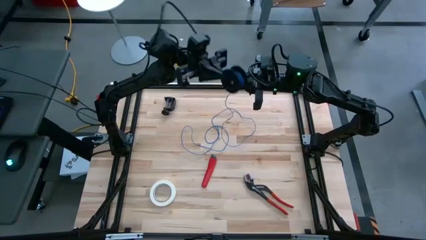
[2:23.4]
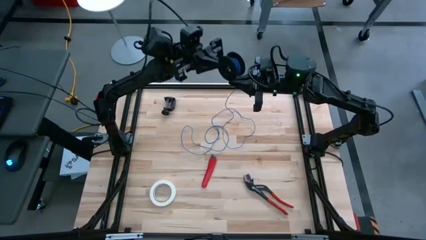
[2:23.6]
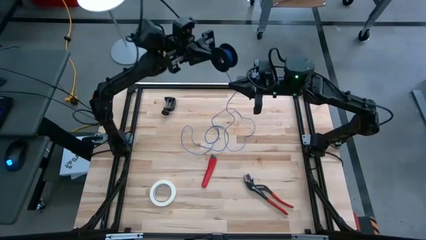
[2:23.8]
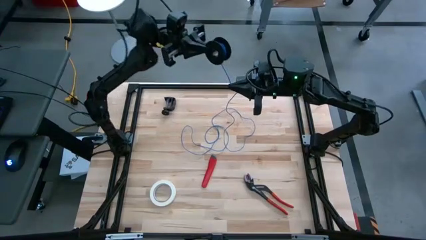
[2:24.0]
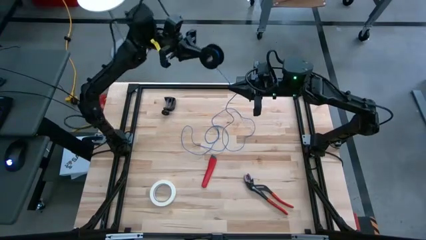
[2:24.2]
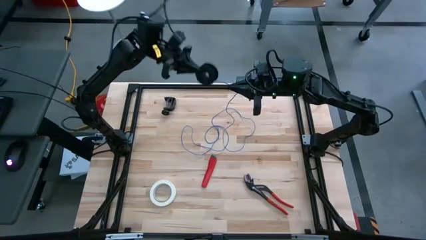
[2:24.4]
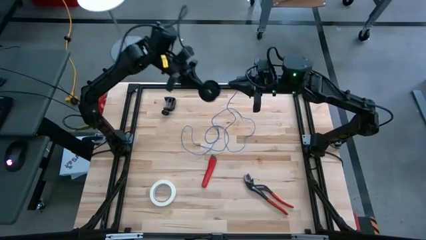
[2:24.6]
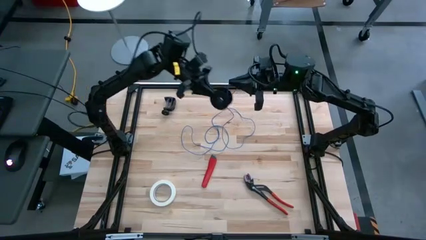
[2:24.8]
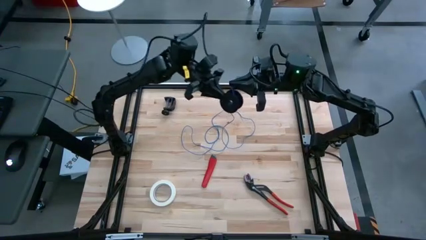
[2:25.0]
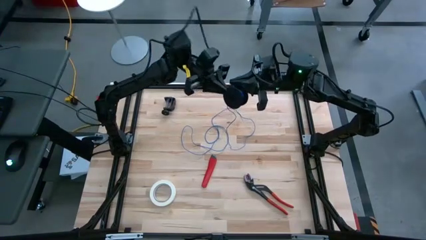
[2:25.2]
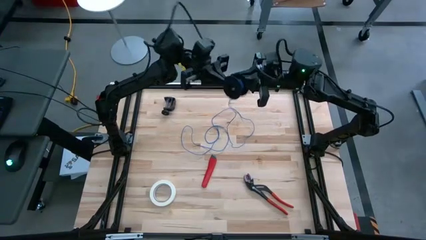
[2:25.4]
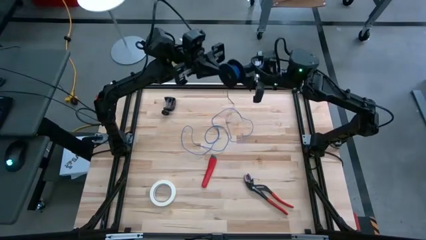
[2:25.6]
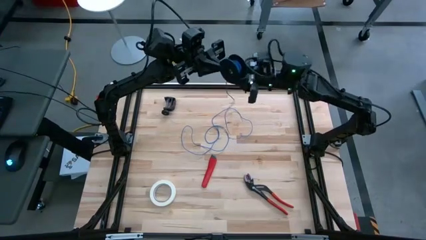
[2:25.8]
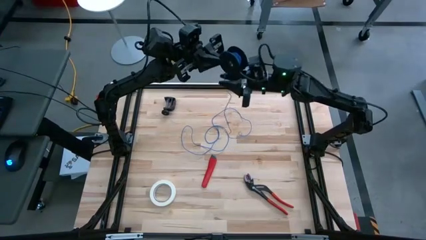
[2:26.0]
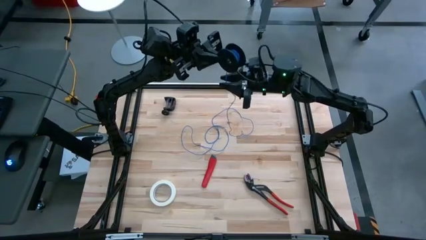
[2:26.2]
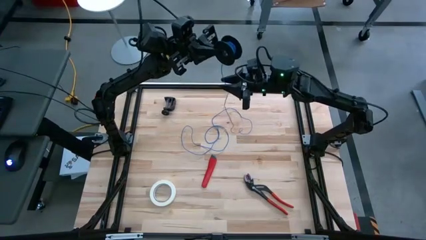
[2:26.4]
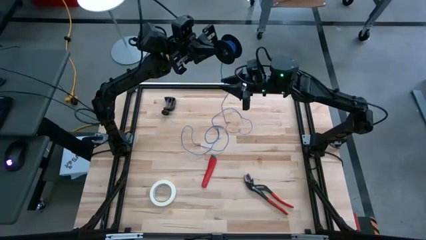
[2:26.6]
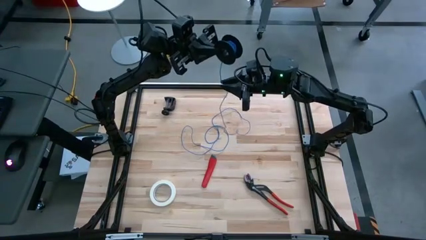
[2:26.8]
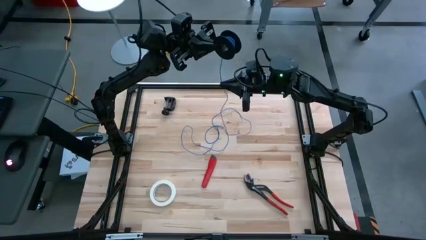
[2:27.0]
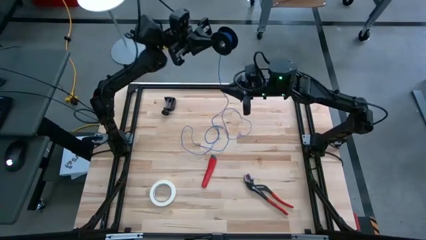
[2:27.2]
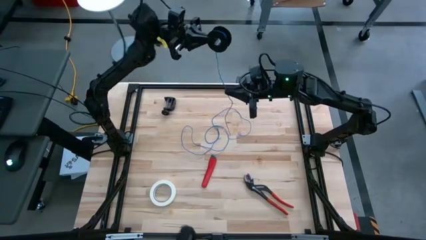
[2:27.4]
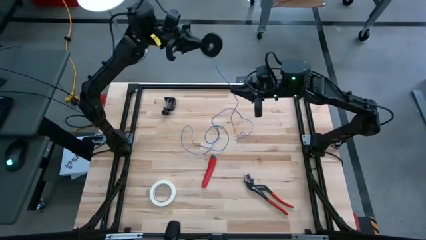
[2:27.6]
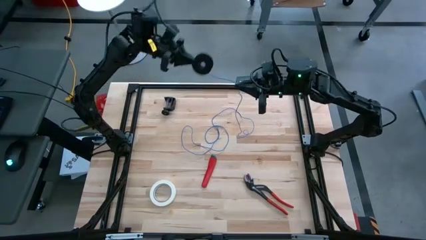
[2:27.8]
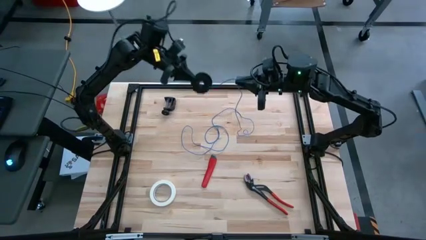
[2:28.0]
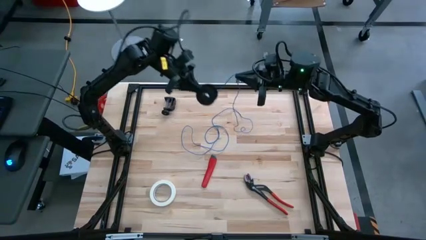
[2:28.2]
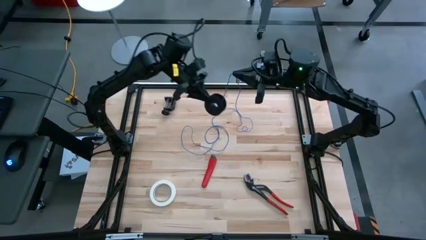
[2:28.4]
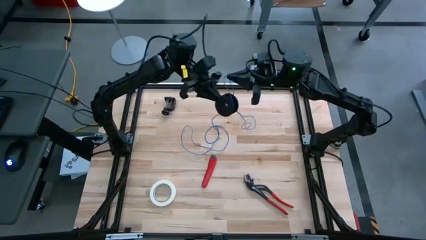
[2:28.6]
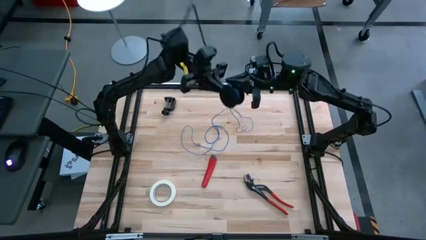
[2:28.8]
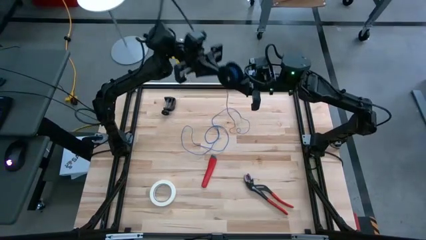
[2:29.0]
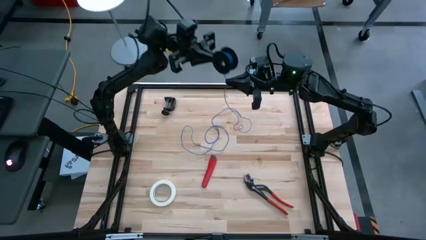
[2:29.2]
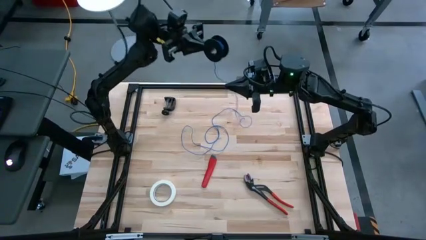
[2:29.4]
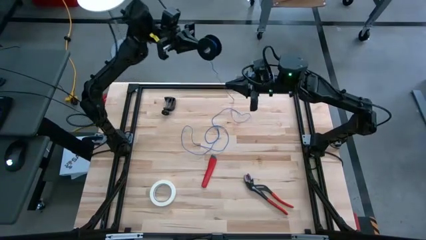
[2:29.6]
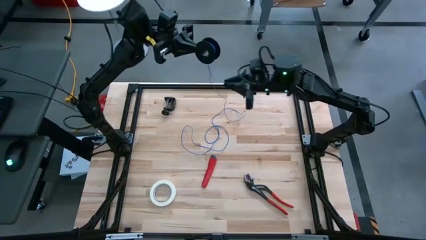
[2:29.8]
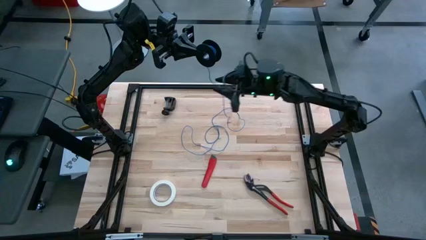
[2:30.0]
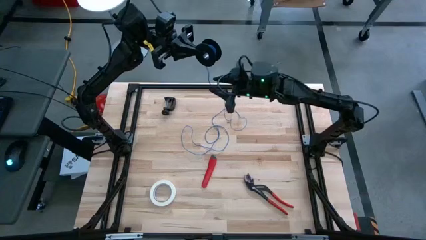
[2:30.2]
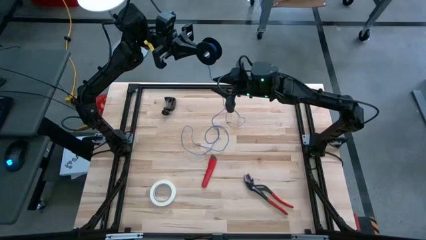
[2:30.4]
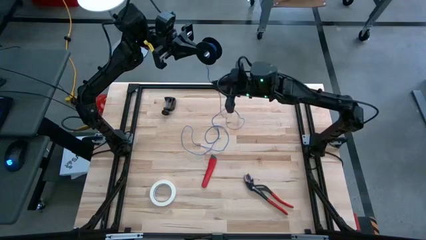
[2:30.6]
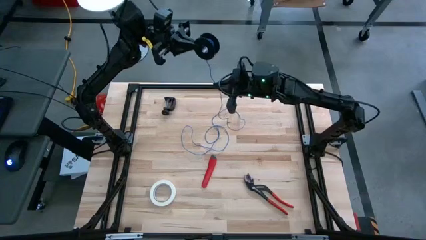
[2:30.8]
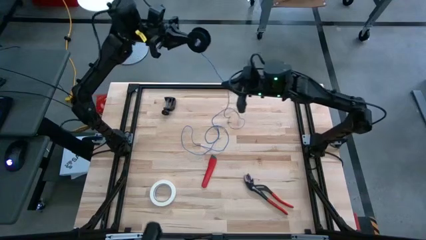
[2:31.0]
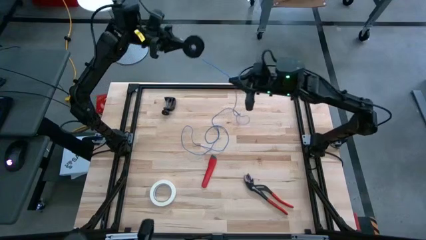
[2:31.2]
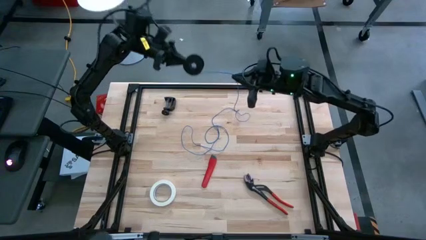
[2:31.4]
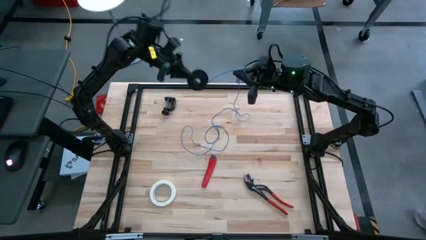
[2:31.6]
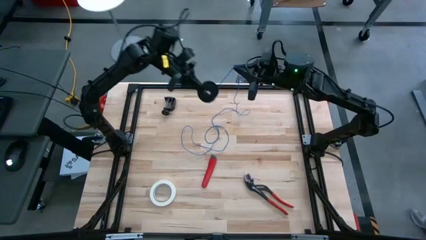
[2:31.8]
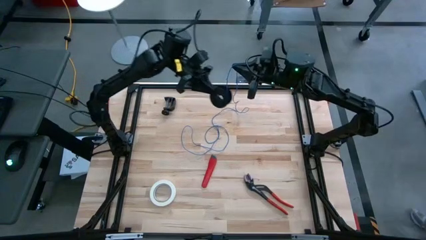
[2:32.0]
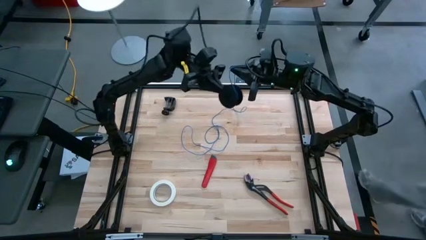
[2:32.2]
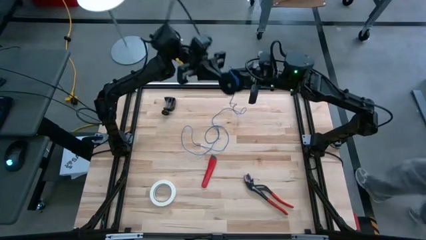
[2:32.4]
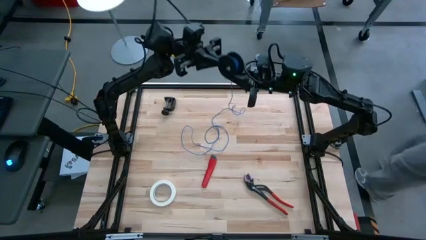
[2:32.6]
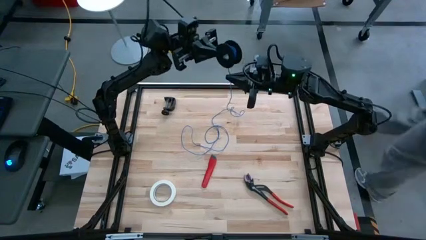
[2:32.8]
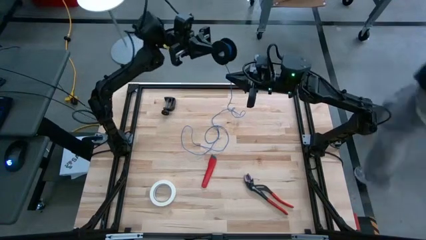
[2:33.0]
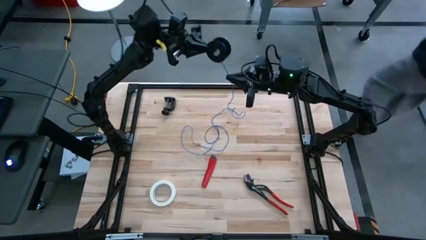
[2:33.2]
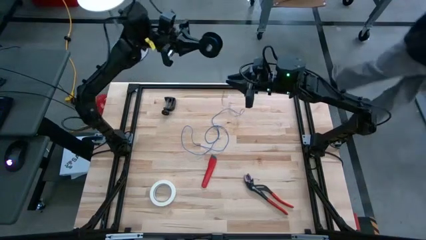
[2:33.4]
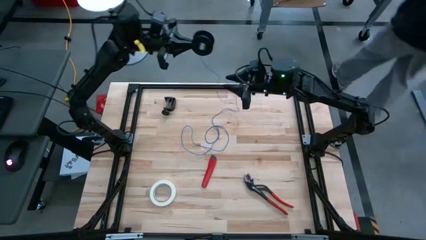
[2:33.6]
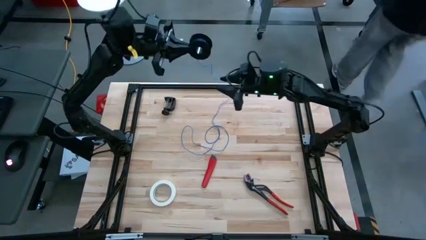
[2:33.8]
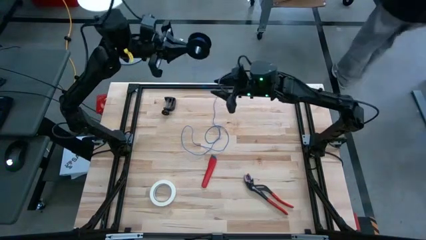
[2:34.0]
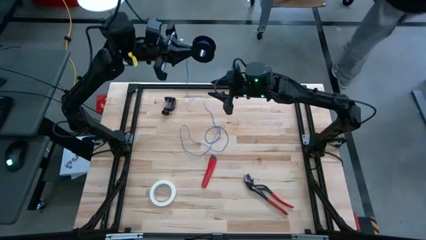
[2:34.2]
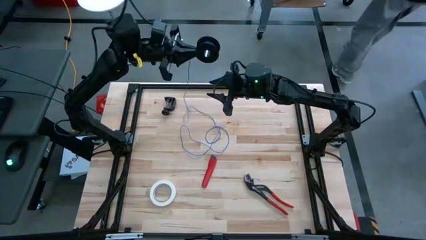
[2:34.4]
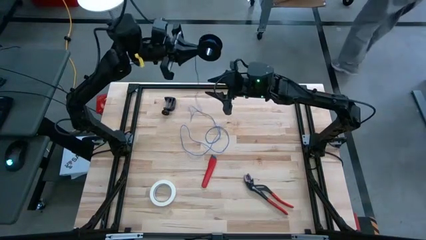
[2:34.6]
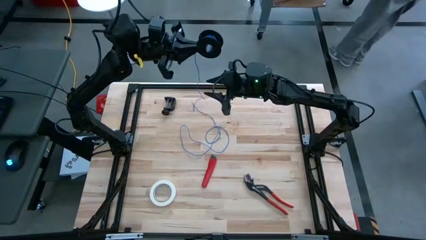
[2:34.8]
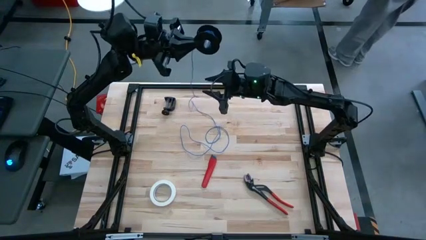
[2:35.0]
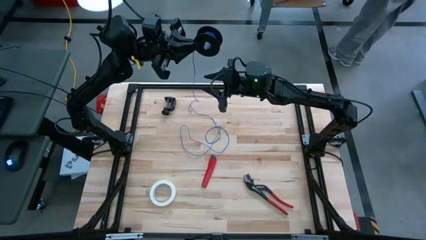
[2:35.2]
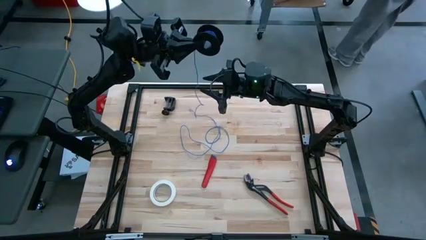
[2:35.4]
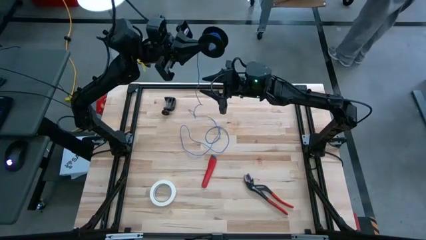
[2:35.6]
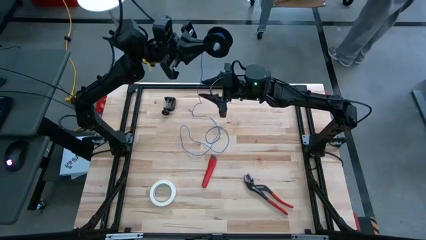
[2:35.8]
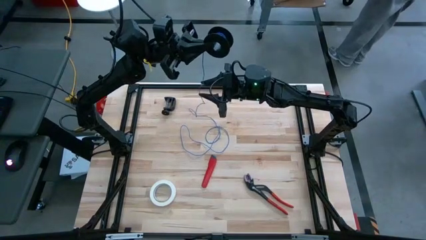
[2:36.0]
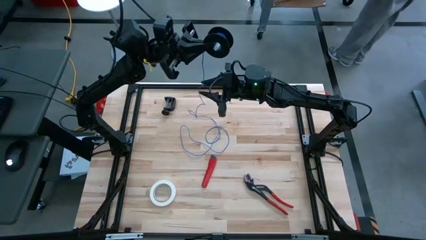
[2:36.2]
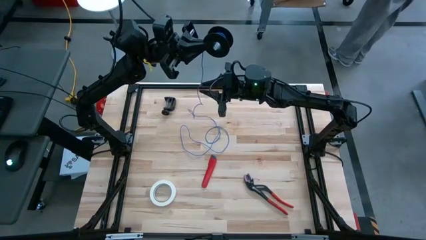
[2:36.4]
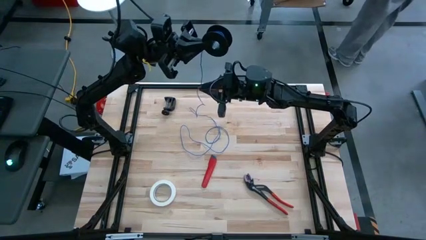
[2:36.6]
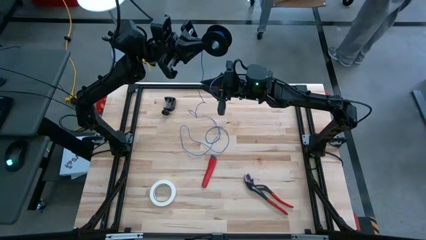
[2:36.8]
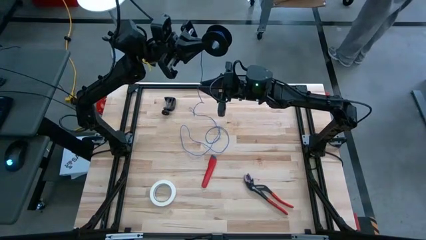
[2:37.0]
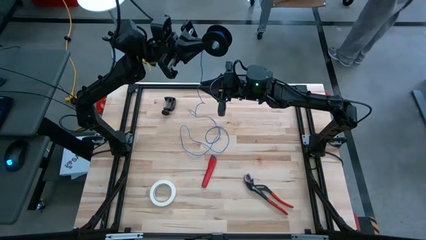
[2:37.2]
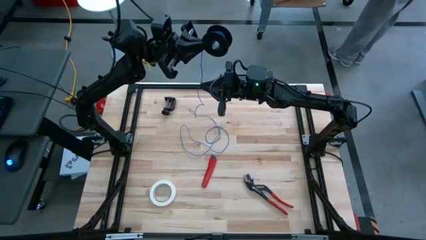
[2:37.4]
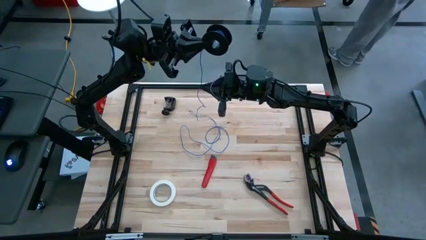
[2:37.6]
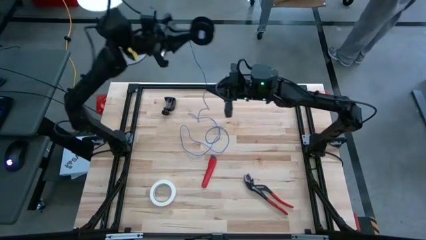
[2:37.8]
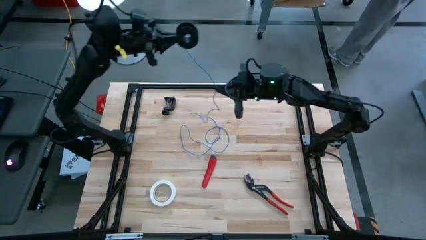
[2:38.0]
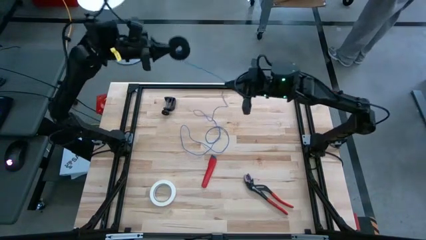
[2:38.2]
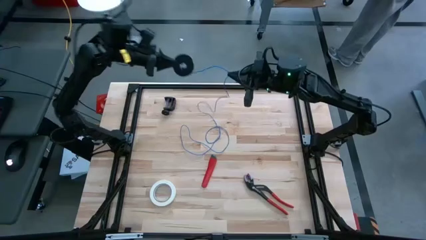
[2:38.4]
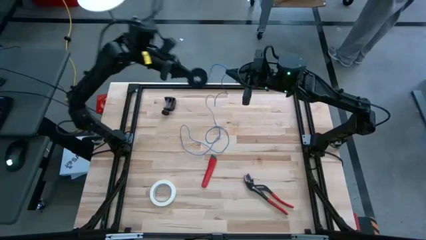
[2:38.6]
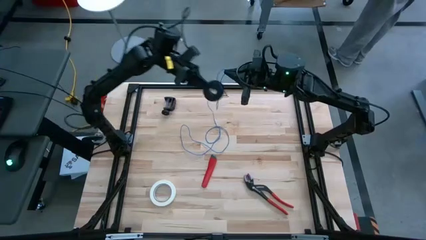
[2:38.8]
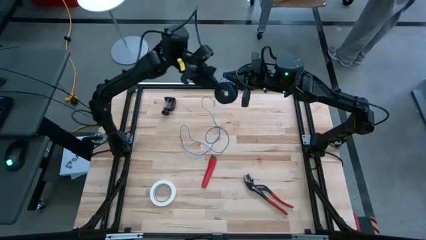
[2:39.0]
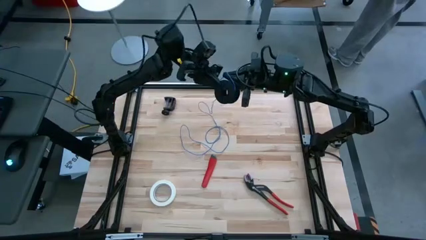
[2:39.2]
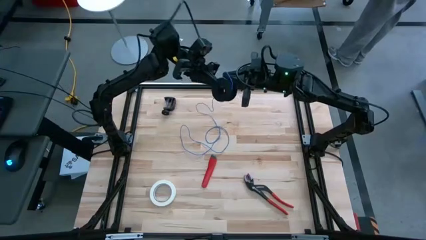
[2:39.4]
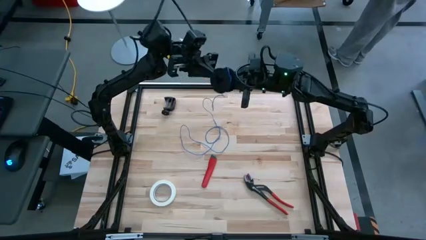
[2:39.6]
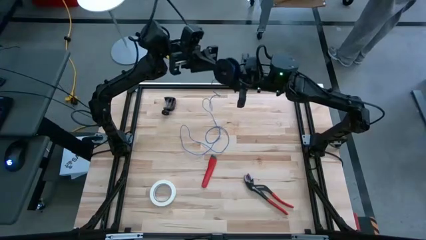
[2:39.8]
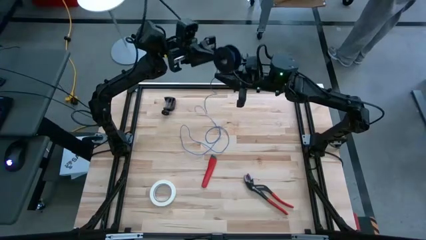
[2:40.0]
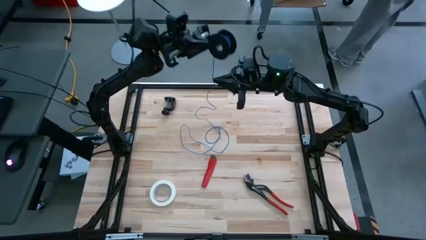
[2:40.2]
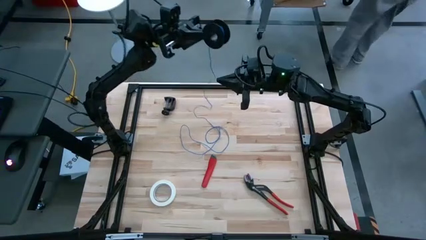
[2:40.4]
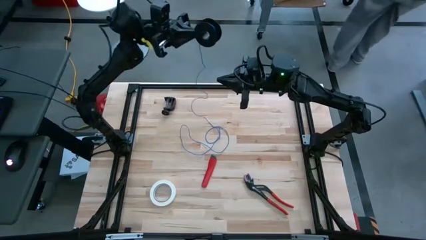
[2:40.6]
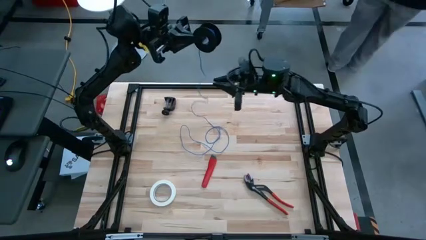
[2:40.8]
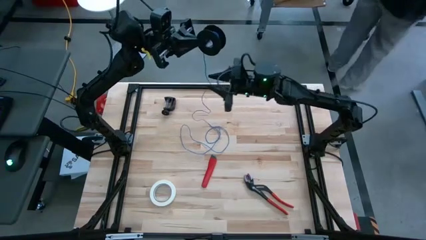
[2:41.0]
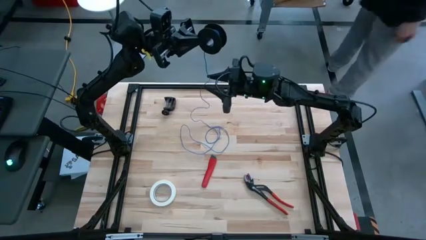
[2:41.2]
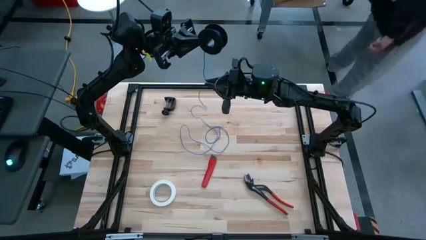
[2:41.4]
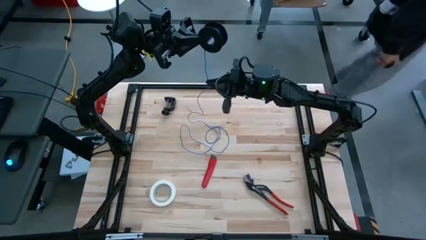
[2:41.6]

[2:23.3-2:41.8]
Task: Coil cords
Coil the blue wire cable onto the black spool
